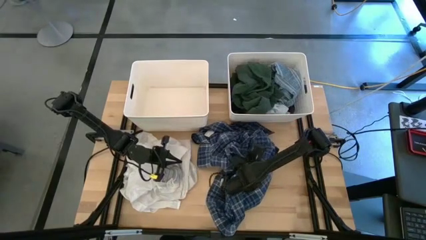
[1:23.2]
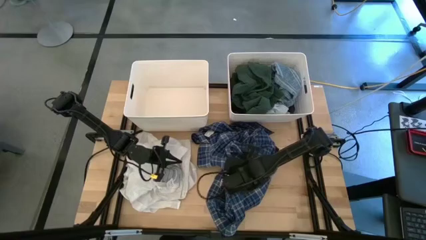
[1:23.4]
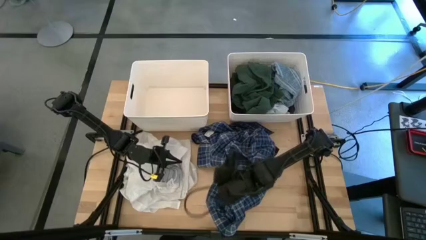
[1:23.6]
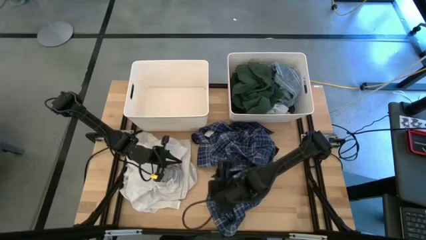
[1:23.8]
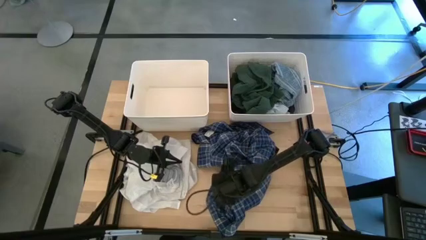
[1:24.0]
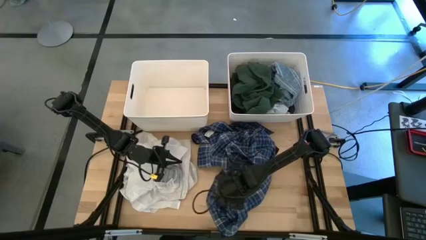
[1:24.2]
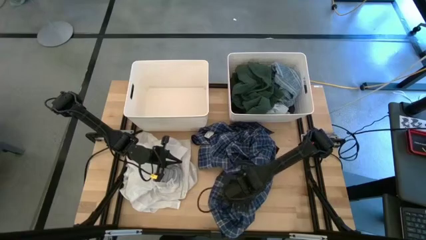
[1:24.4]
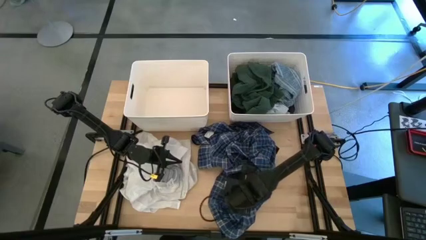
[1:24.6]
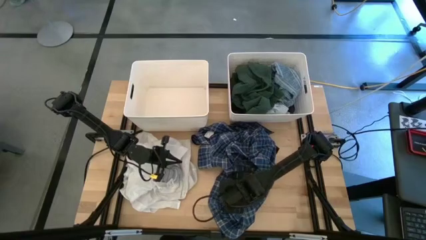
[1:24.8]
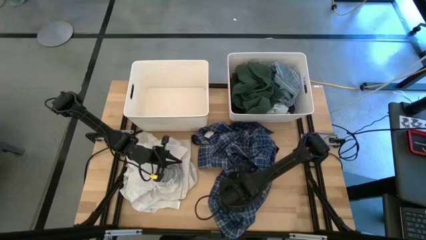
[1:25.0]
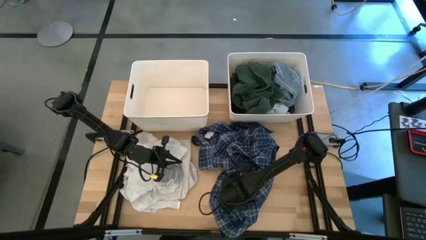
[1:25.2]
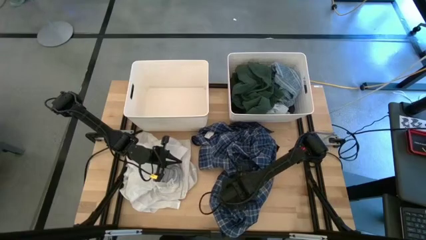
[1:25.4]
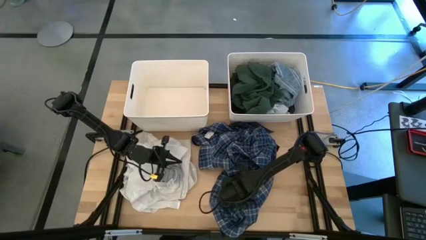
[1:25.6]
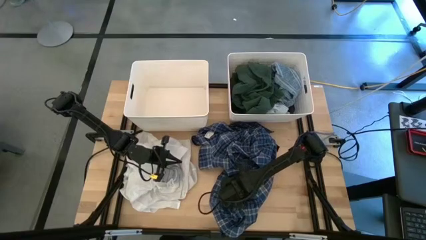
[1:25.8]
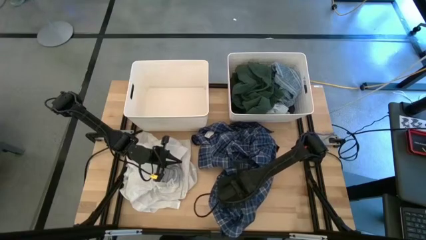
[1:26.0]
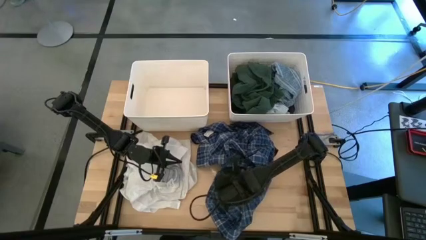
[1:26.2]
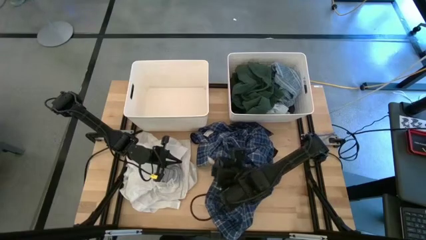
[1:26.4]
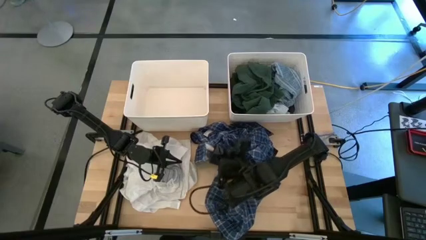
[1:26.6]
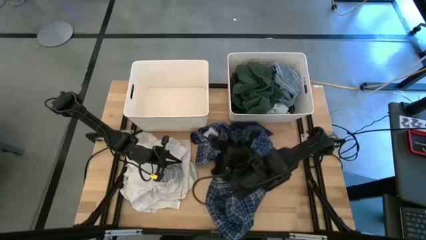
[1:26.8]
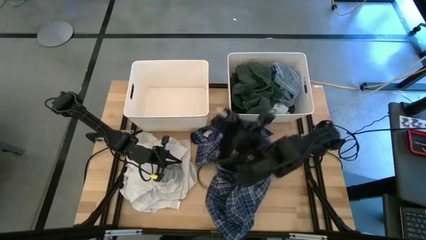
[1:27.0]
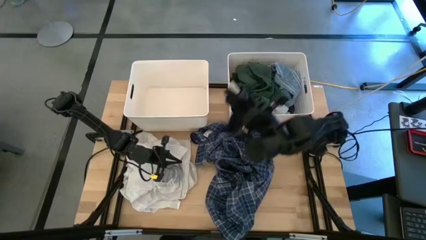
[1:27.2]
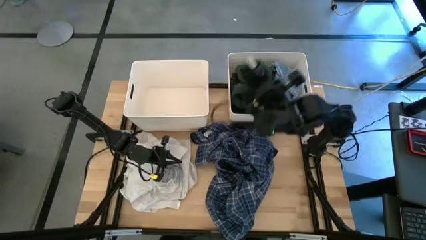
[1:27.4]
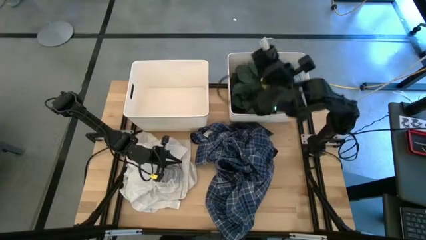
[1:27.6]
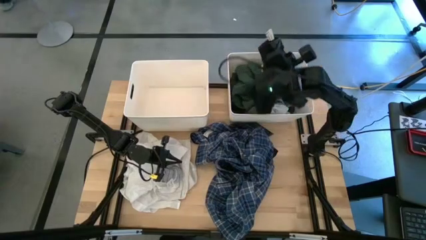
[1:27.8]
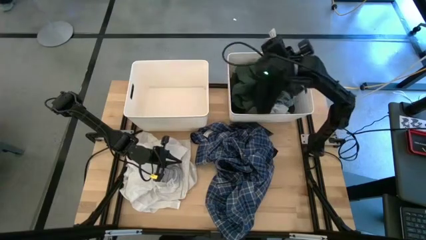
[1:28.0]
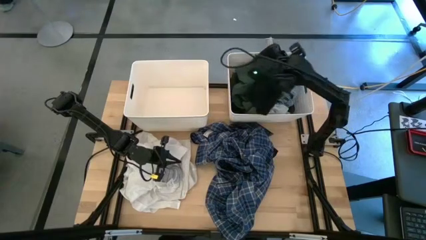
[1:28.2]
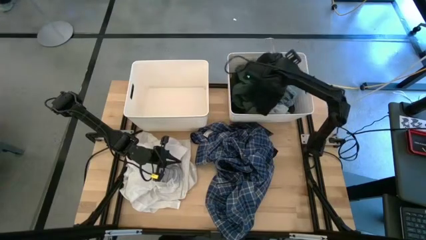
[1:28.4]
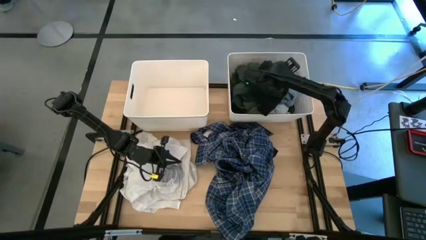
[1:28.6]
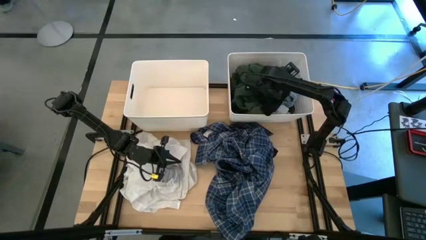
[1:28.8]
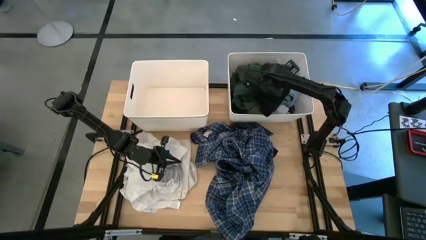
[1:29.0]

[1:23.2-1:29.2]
Task: Sort clothes
Put the black boxer into the right white bin

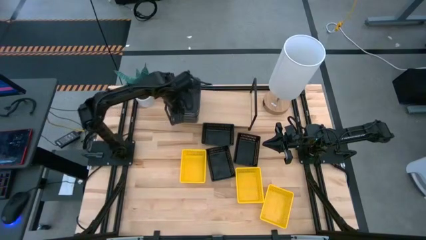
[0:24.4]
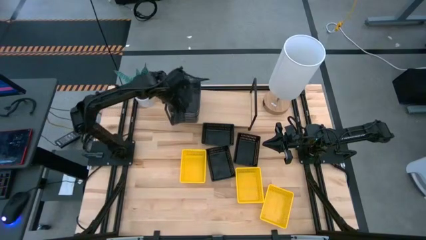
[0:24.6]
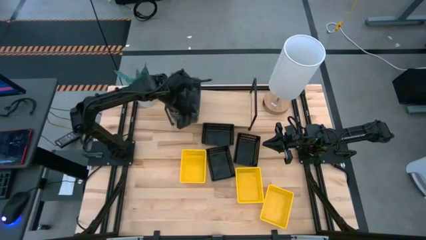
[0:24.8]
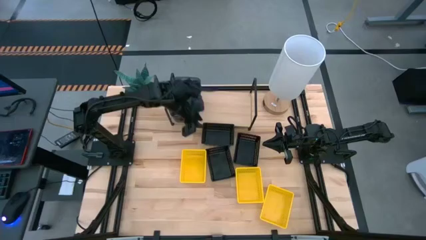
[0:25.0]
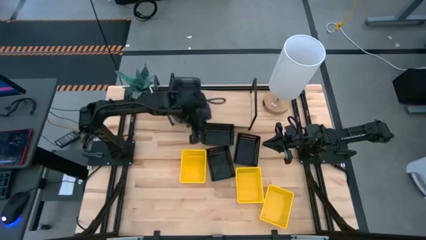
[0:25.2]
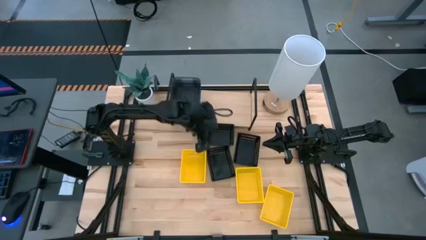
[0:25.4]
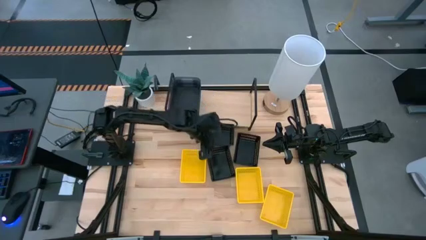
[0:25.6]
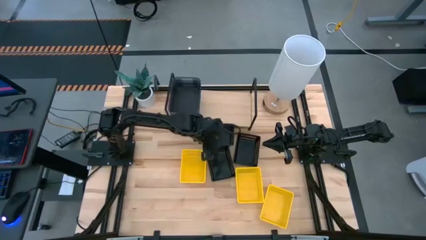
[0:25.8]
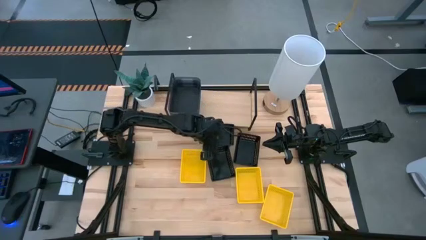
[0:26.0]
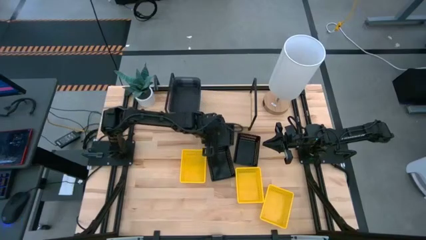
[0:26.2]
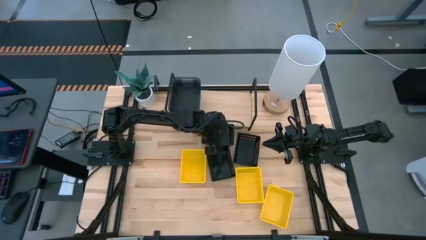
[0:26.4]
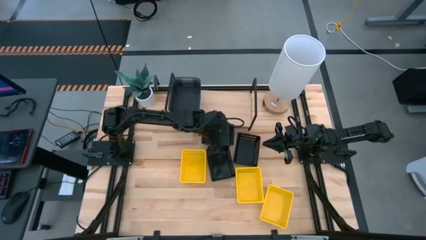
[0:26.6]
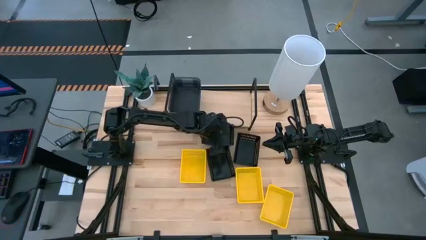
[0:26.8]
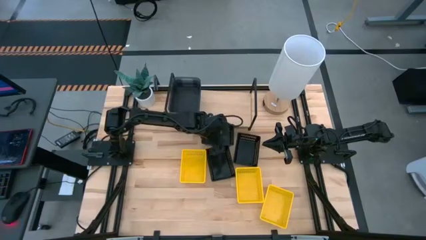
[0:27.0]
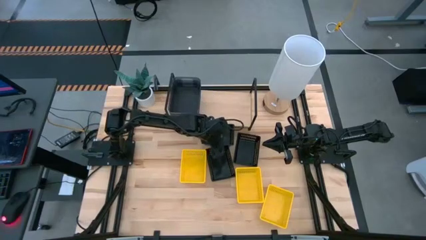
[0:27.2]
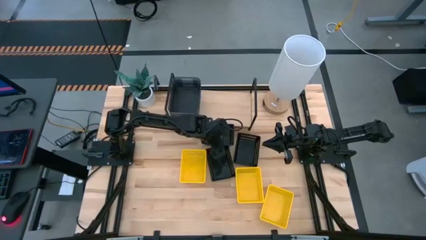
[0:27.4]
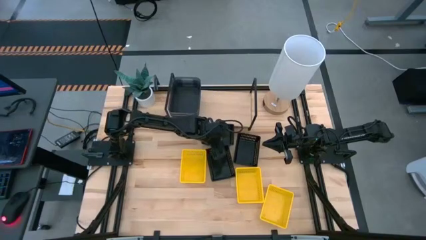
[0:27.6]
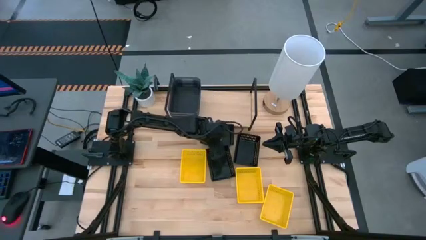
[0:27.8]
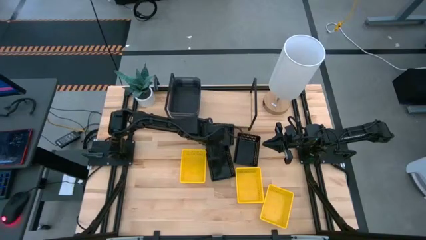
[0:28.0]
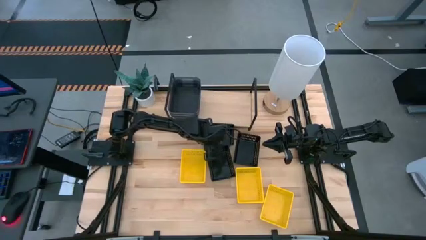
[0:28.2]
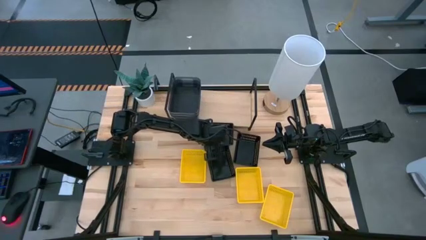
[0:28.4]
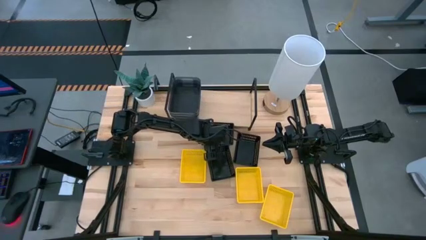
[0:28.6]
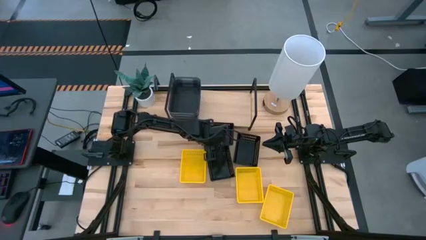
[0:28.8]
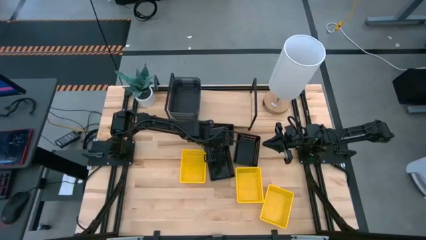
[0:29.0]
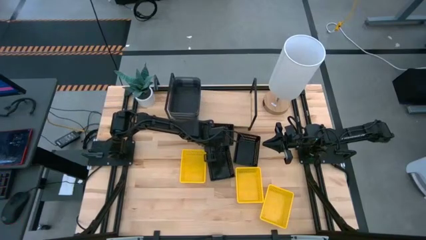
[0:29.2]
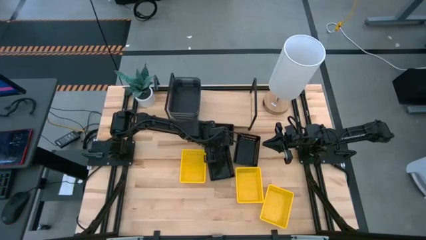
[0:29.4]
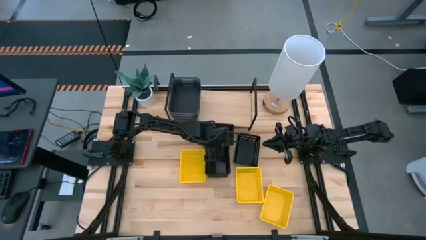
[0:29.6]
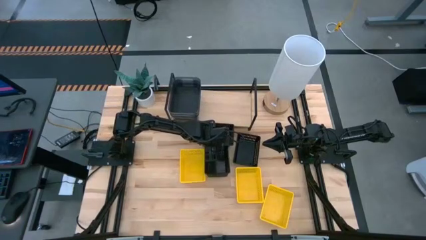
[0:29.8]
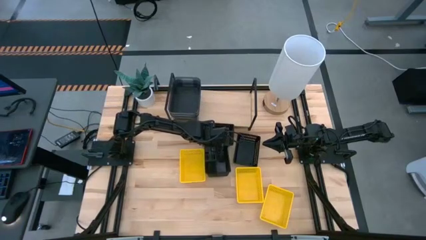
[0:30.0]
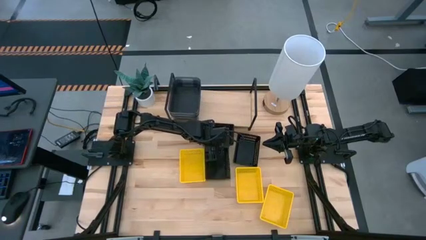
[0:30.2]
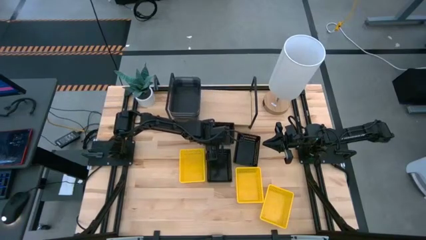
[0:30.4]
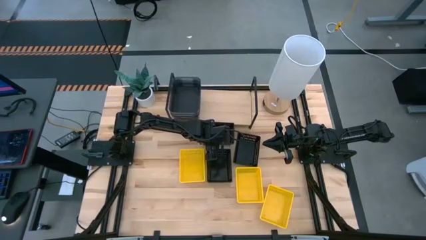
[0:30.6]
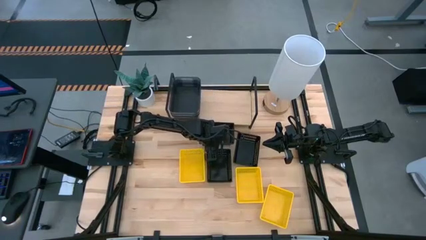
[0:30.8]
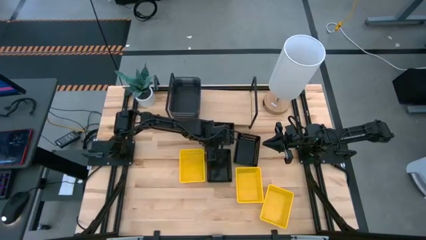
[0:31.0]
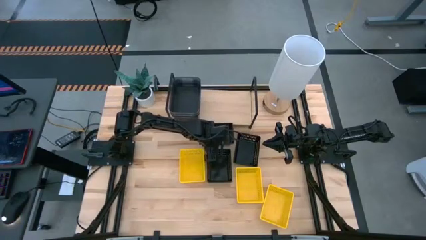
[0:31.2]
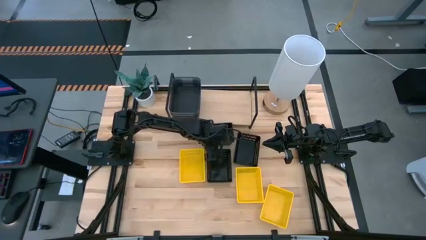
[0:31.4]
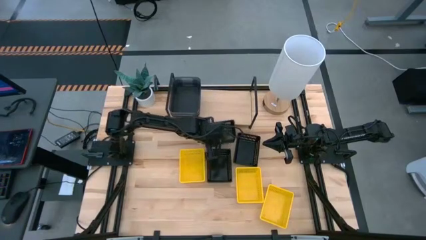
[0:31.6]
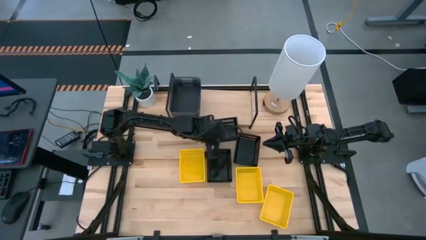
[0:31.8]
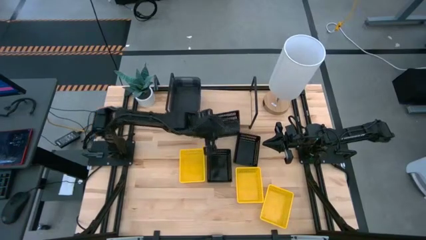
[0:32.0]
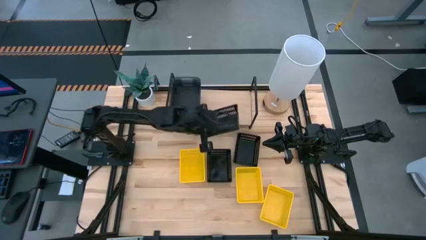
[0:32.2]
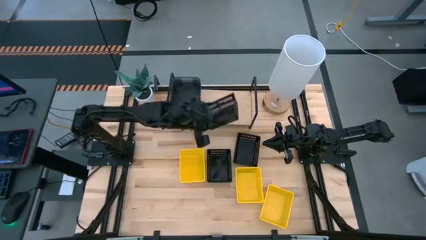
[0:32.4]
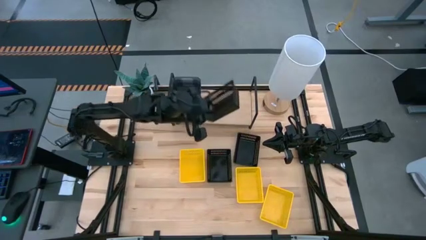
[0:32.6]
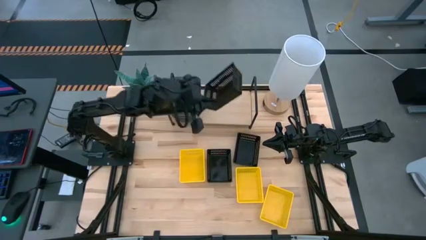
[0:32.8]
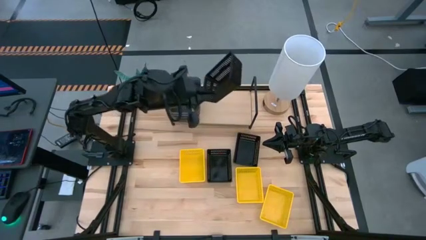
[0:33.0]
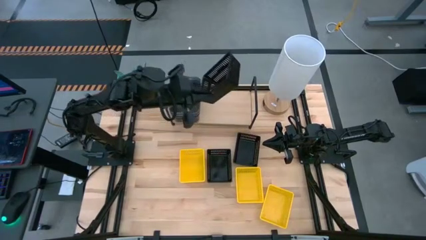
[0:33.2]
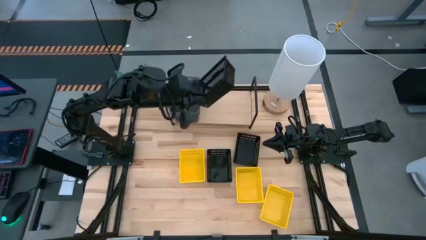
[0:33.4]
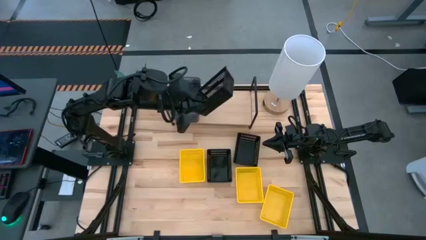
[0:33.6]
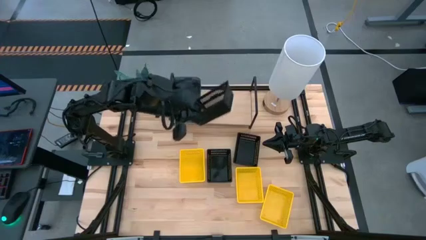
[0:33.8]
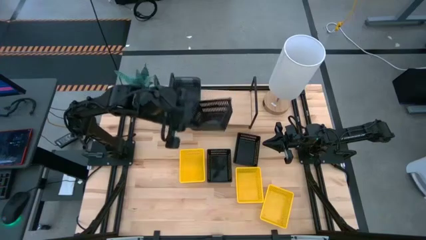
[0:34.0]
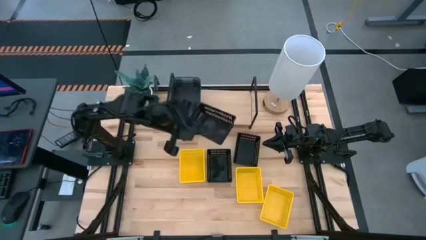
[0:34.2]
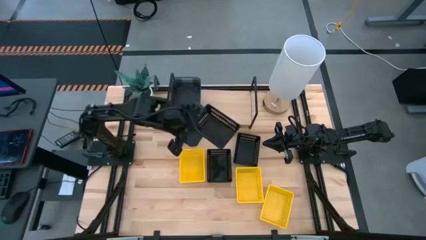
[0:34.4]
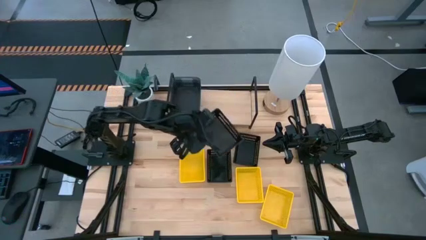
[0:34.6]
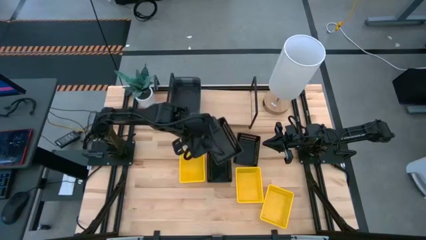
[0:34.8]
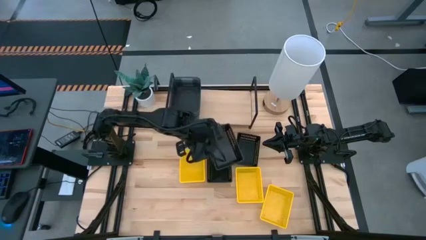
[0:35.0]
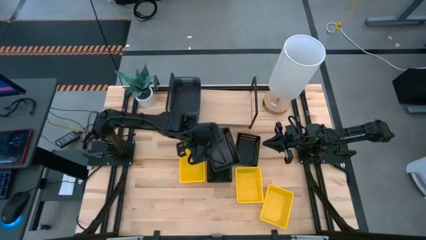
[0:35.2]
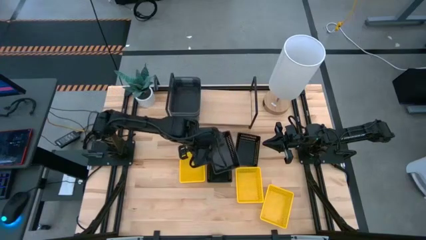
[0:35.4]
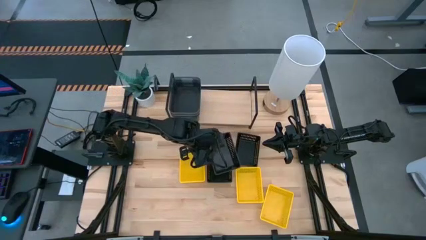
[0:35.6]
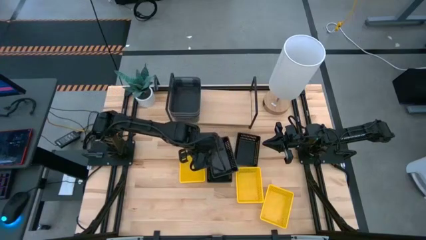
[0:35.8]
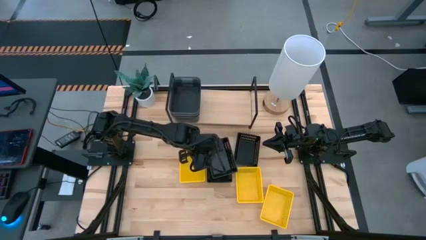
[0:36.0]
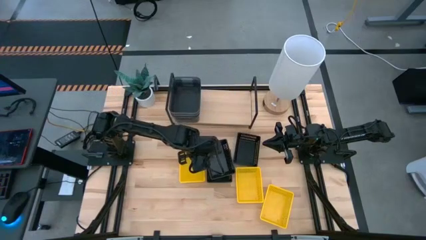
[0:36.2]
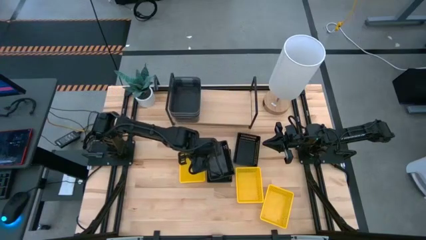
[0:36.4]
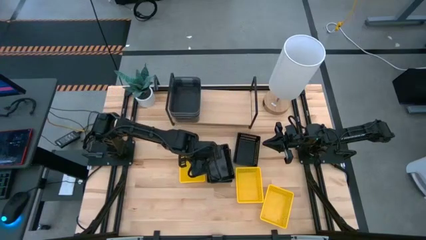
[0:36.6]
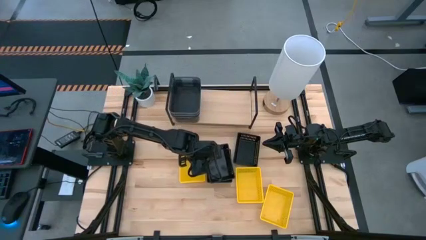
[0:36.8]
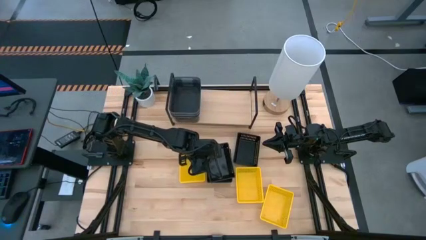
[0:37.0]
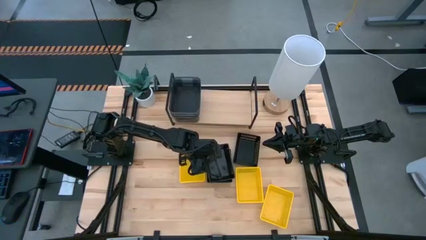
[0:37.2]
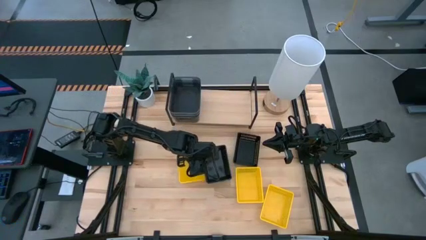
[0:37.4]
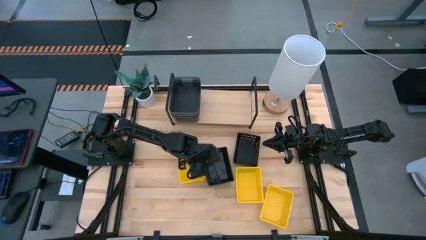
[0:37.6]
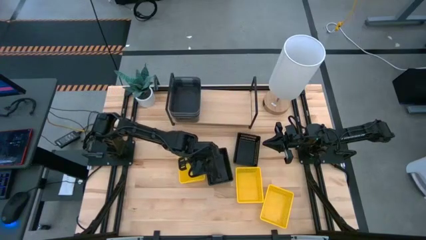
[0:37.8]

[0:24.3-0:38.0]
Task: Stack baskets on shelf by color
Stack the top black basket on top of the bottom black basket
